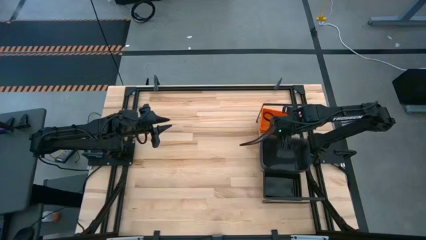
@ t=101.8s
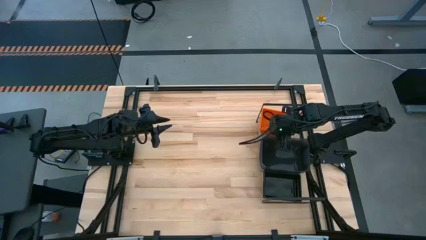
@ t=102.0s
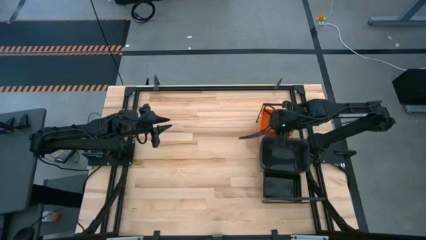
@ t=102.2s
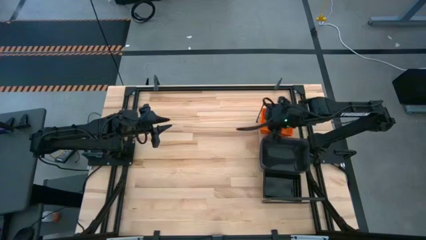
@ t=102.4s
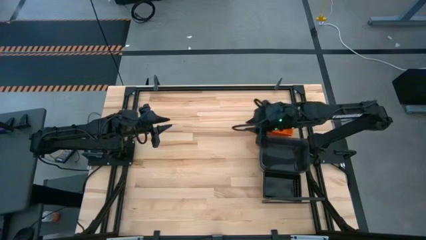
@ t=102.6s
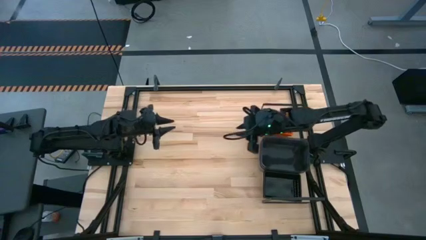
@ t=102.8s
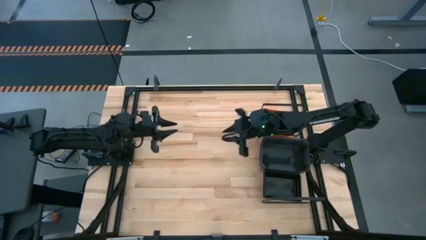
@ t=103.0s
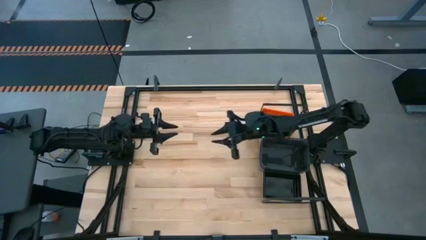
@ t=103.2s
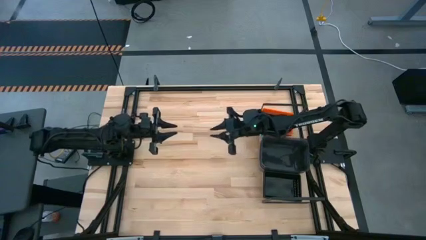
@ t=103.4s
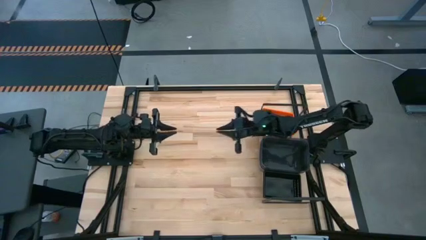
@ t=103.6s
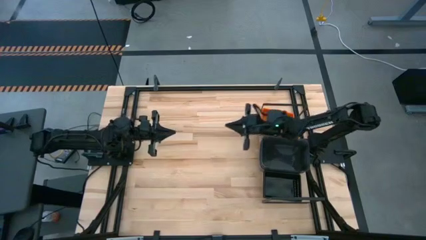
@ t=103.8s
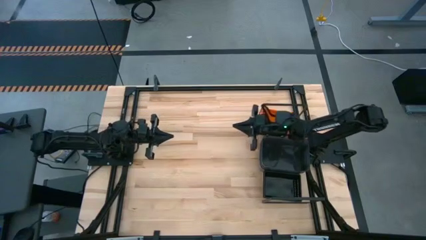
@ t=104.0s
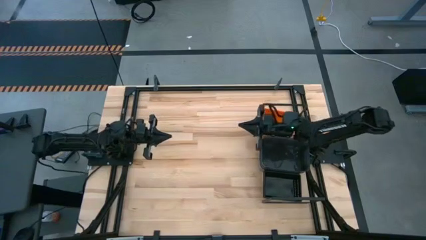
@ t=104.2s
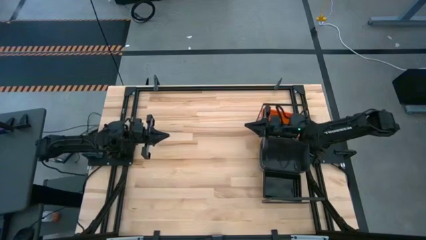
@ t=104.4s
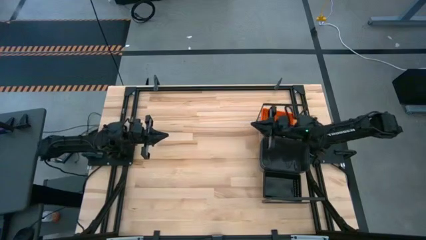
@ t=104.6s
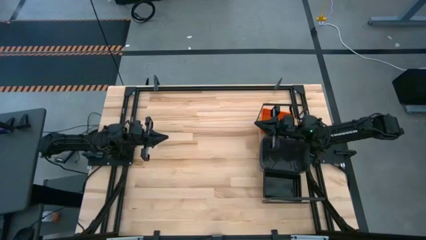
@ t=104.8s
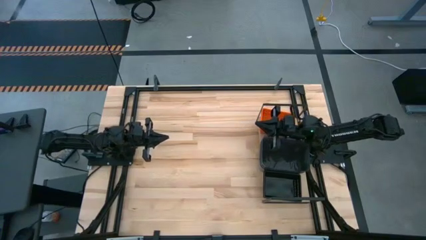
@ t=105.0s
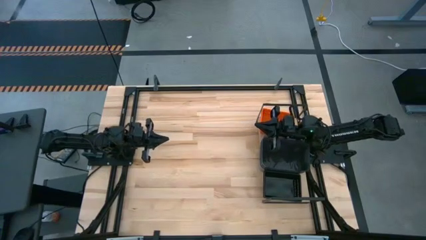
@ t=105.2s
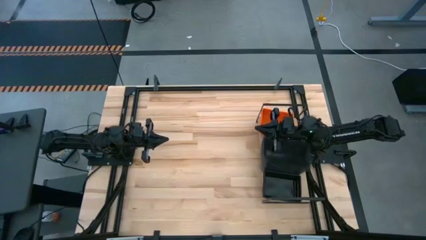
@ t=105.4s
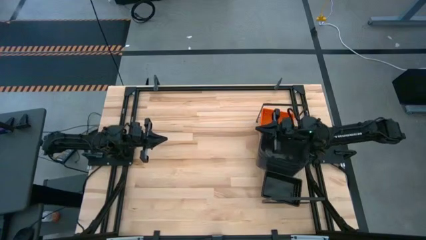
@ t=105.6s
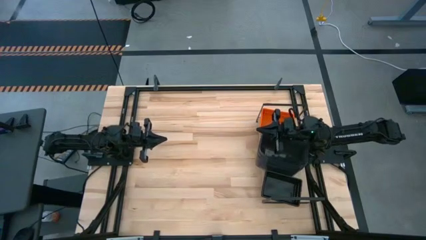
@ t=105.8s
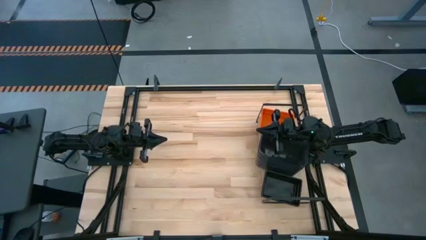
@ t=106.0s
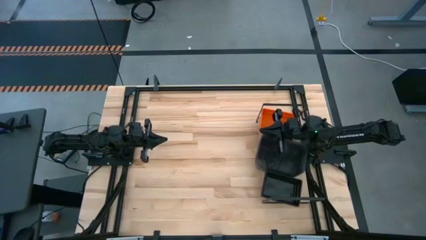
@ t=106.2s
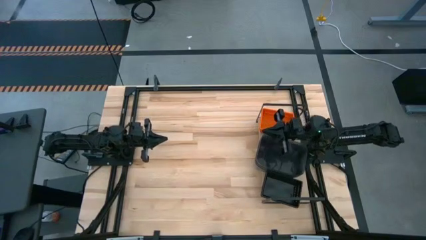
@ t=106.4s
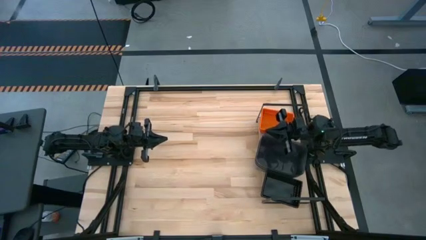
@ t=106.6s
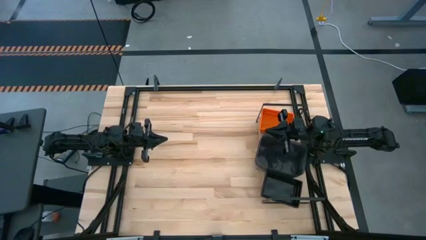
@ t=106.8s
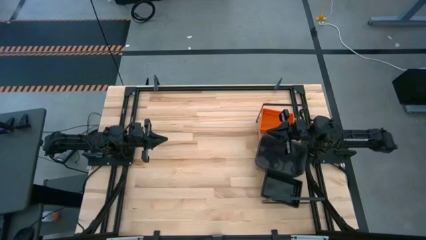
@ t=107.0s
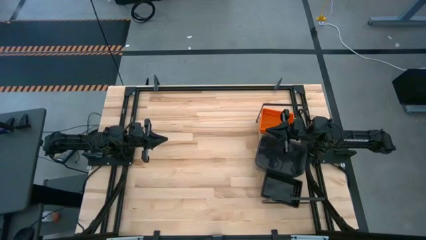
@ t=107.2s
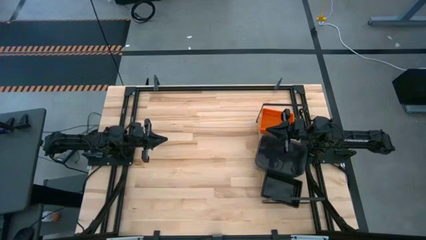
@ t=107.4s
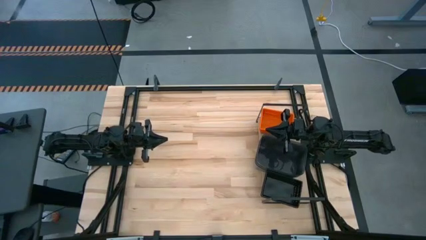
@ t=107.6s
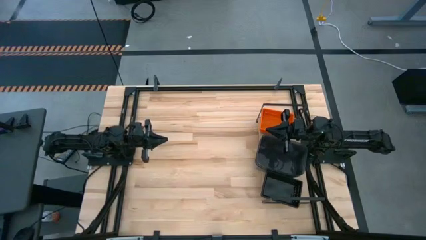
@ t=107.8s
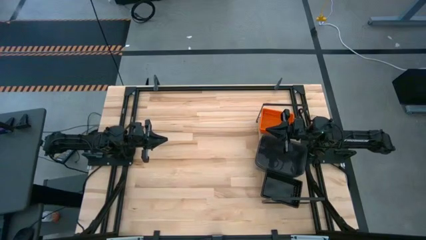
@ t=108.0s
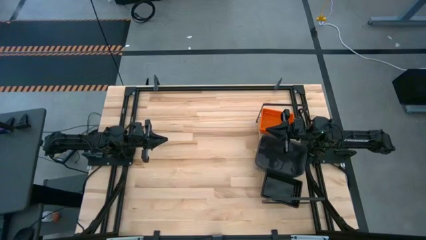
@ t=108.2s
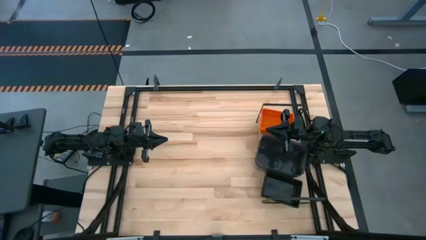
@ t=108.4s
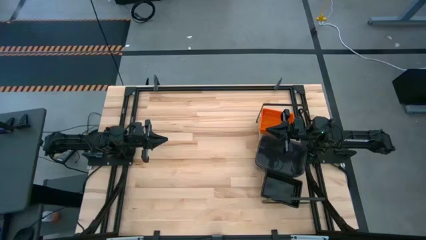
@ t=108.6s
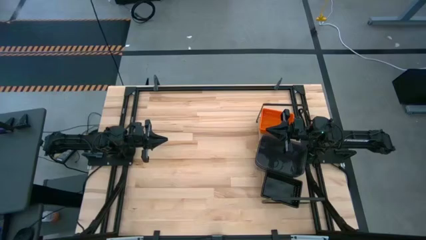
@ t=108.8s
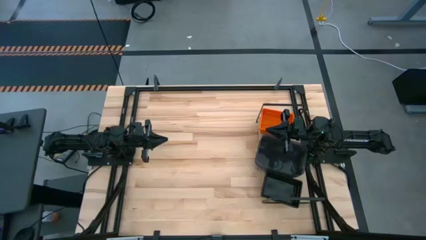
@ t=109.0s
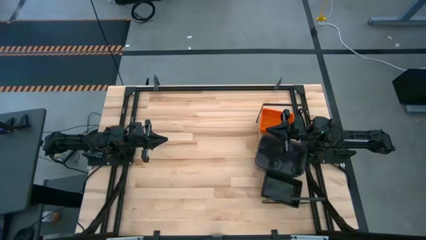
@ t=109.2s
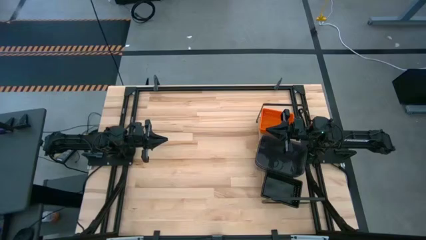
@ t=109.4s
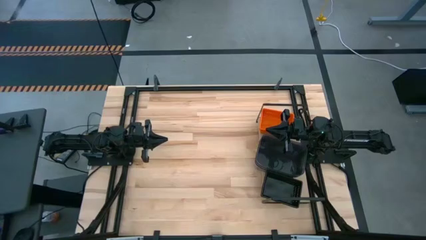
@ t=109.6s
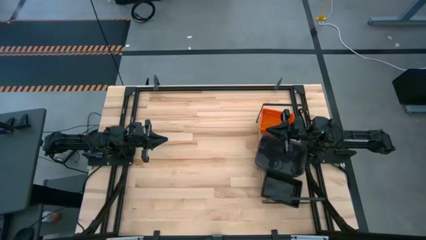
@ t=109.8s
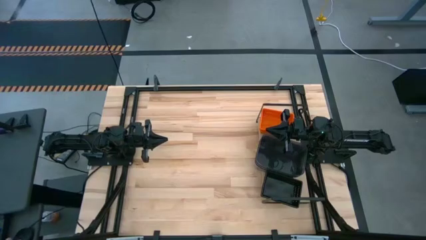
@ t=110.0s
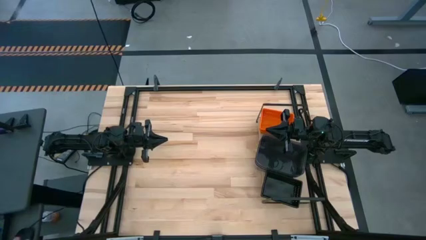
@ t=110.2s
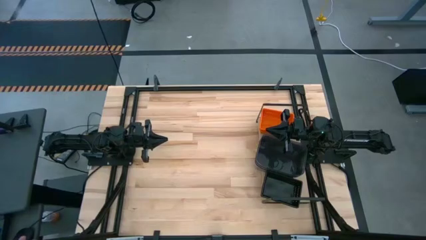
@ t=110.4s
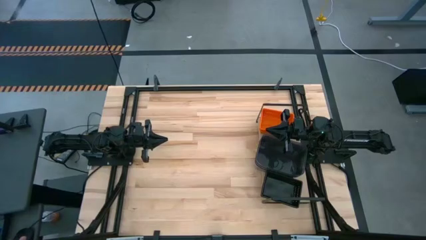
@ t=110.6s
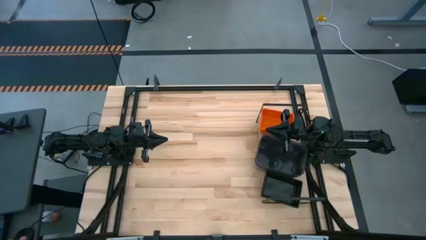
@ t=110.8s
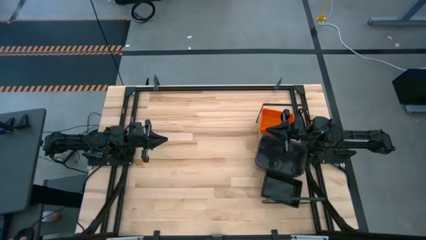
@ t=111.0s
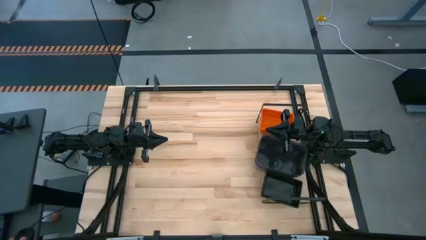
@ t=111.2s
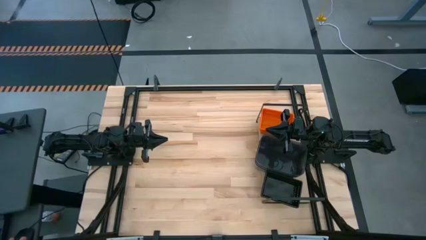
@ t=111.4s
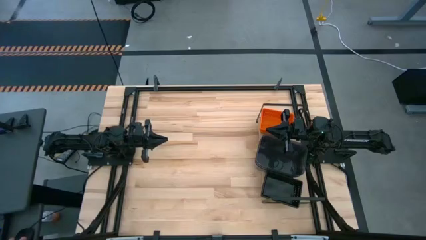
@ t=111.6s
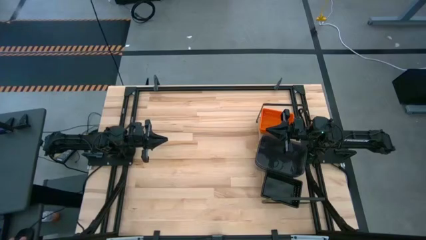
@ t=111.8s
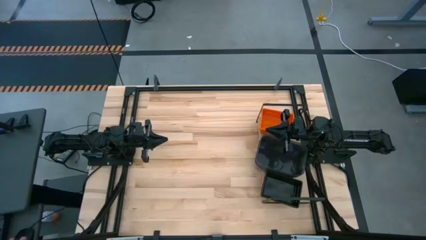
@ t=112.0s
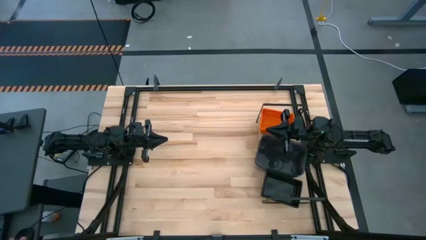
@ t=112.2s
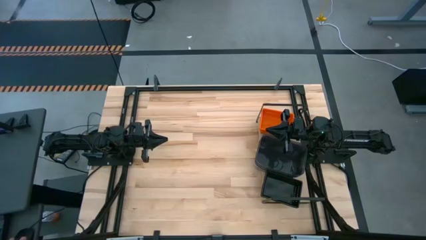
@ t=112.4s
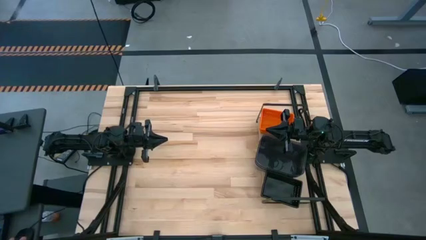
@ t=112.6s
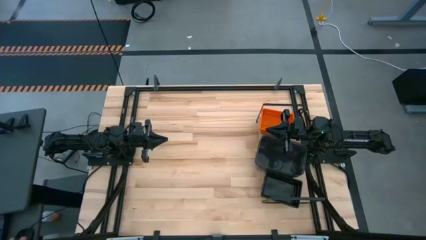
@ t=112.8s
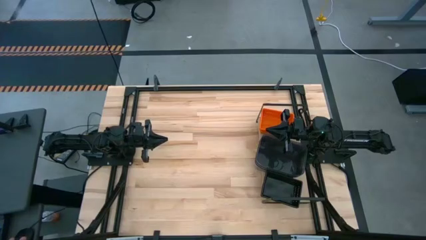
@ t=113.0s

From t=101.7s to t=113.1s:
Task: Stack baskets on shelf by color
Return to Home Position
